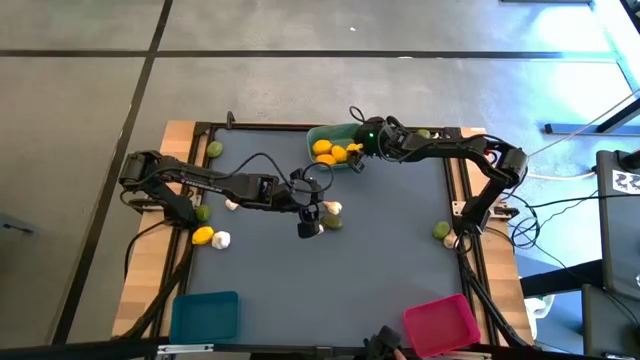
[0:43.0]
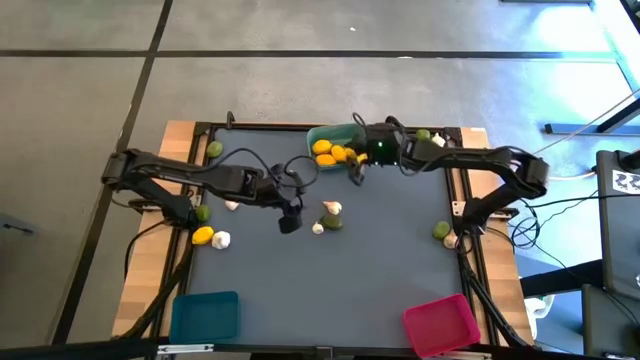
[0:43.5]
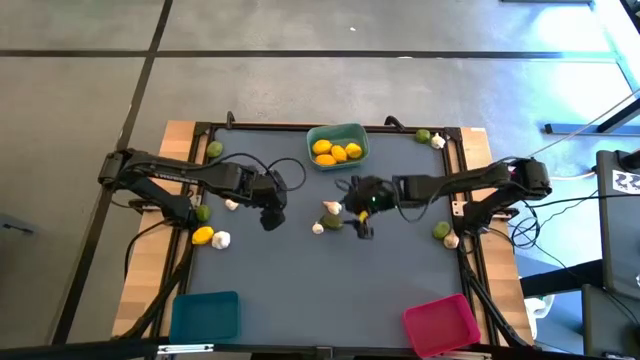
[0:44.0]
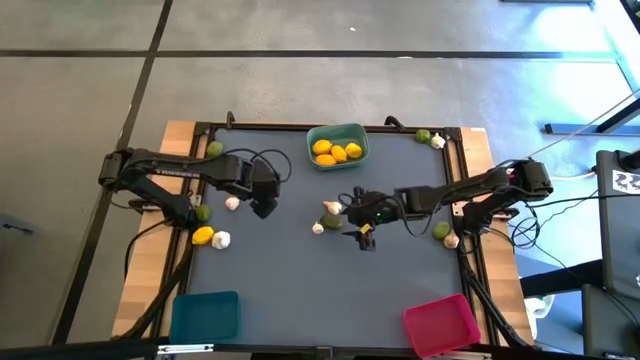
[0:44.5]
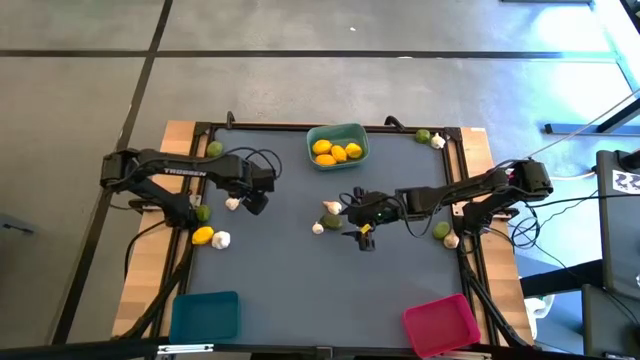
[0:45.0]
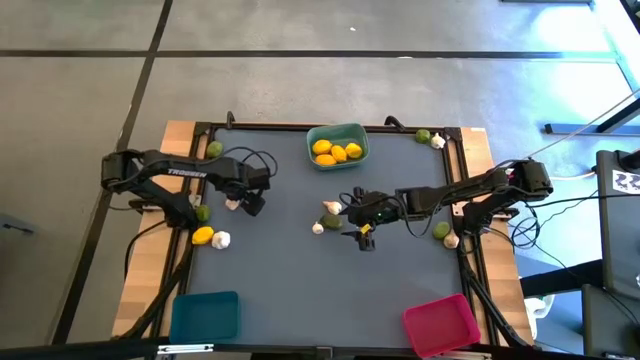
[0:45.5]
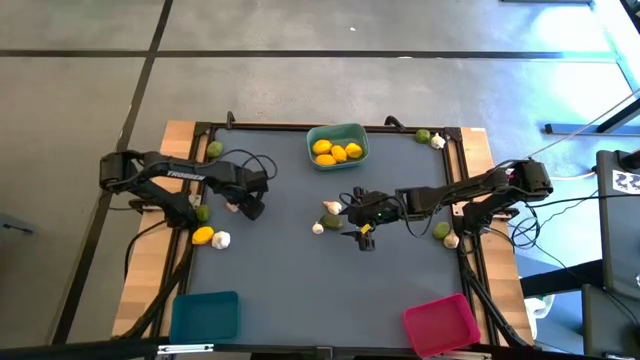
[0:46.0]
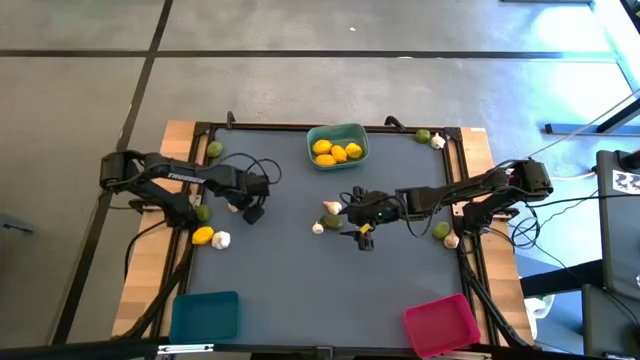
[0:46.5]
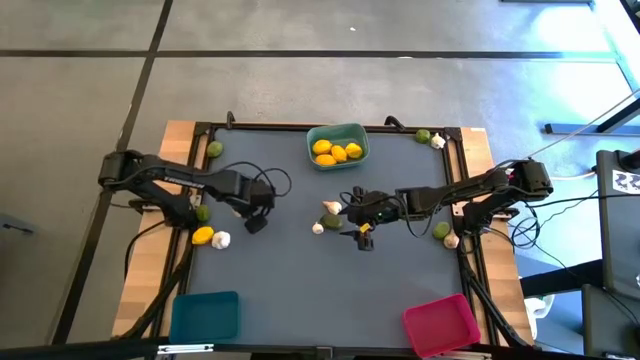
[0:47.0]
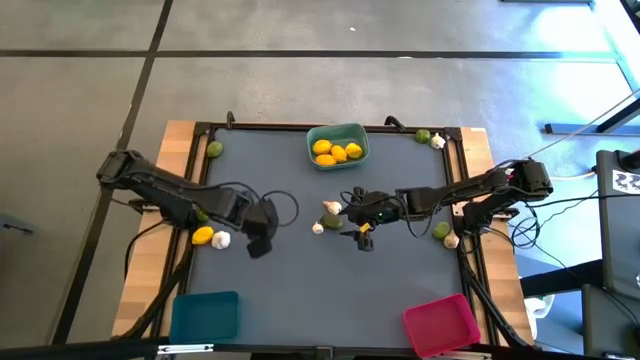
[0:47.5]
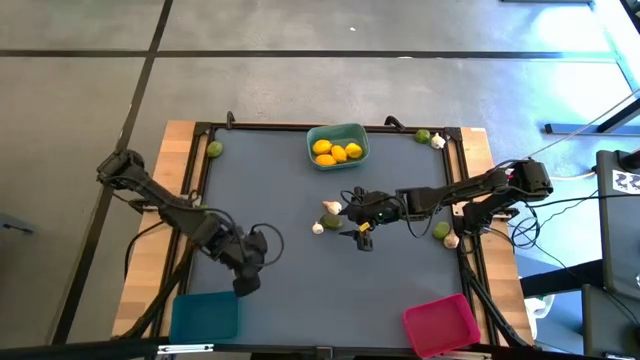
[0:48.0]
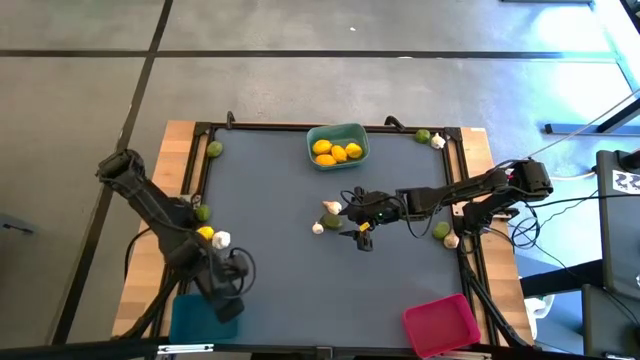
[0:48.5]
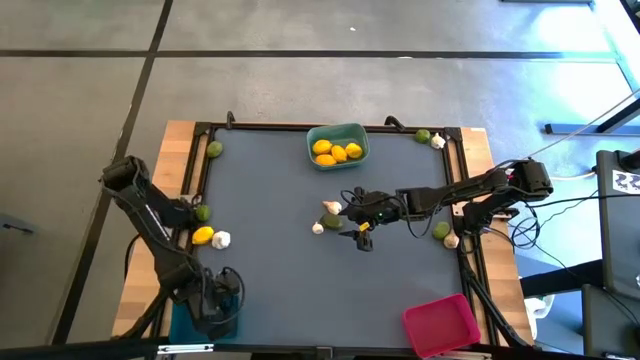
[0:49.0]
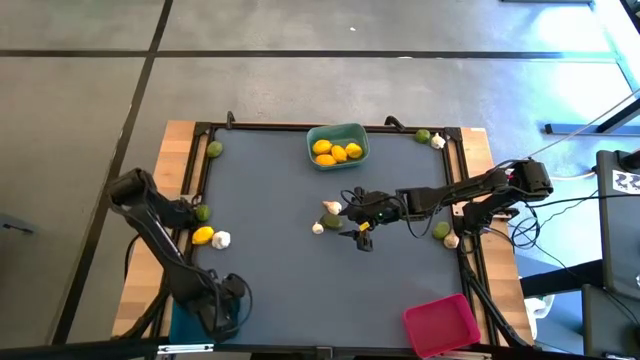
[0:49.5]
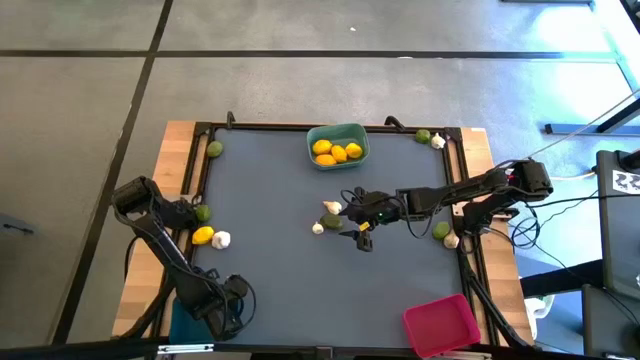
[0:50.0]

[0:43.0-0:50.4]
Task: Sort produce into baskets
Put the white garlic into the blue bin

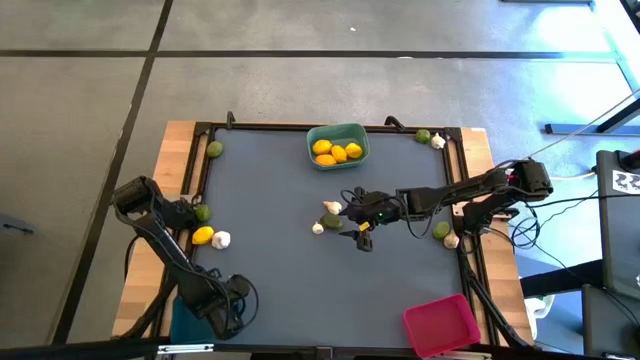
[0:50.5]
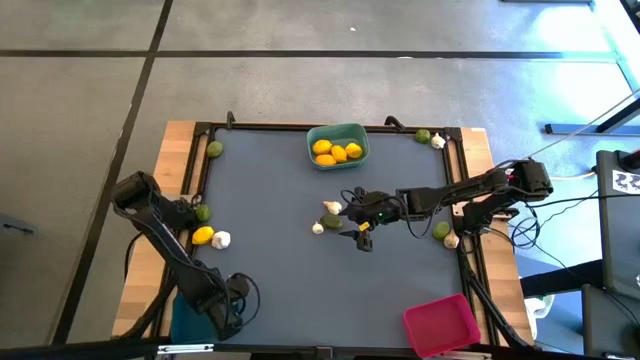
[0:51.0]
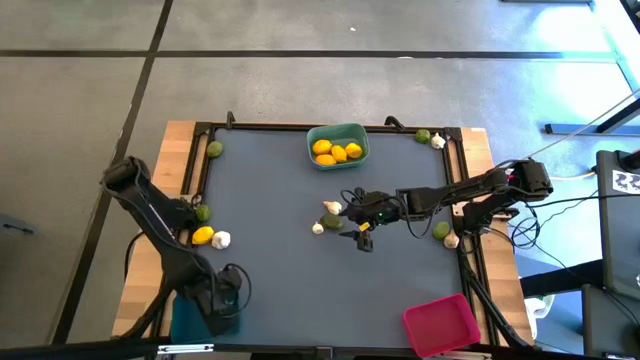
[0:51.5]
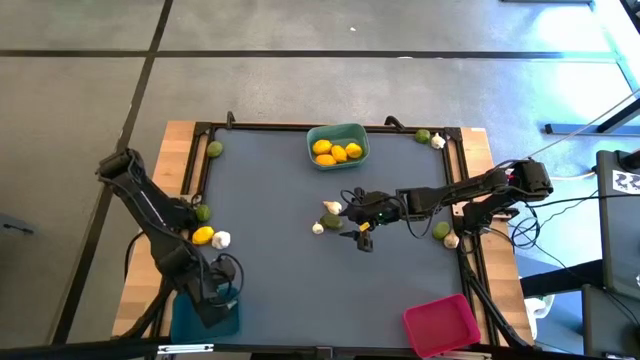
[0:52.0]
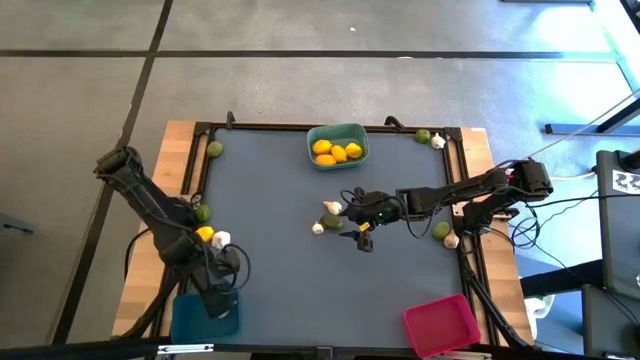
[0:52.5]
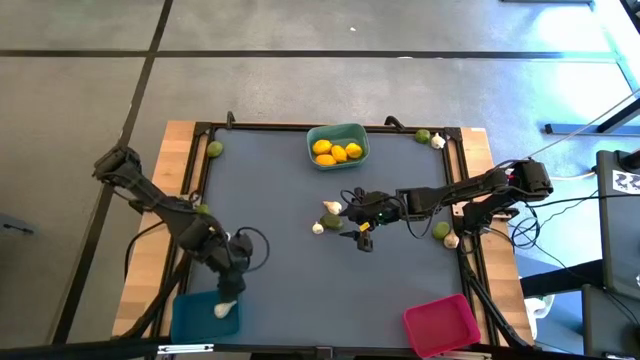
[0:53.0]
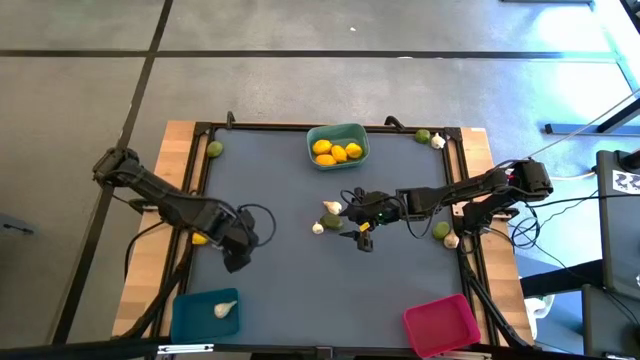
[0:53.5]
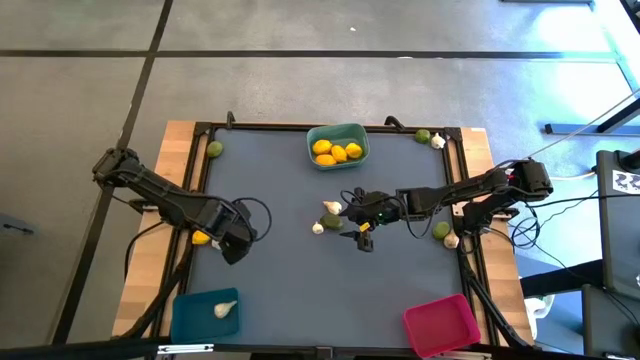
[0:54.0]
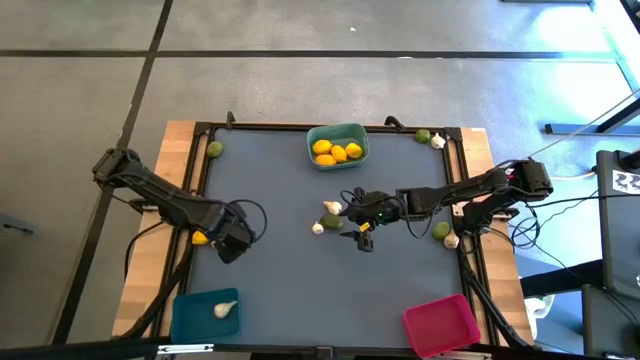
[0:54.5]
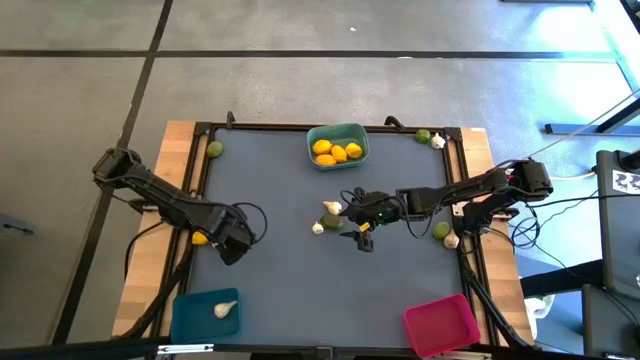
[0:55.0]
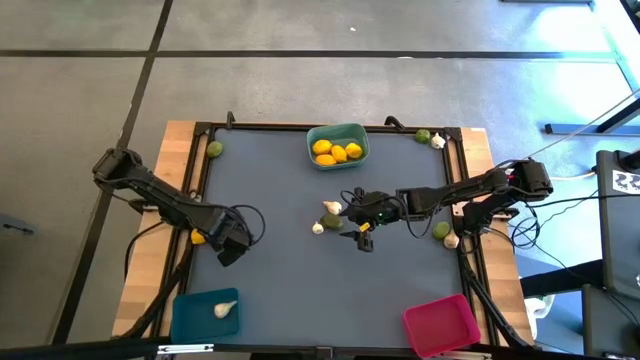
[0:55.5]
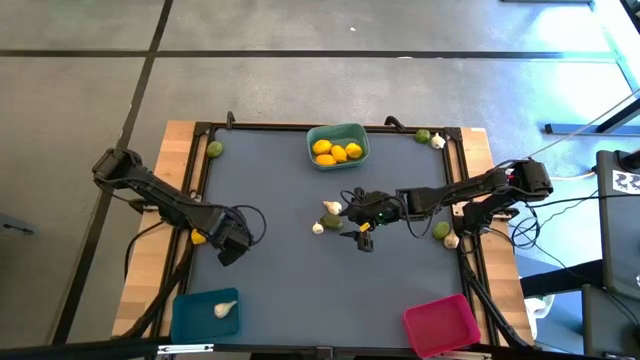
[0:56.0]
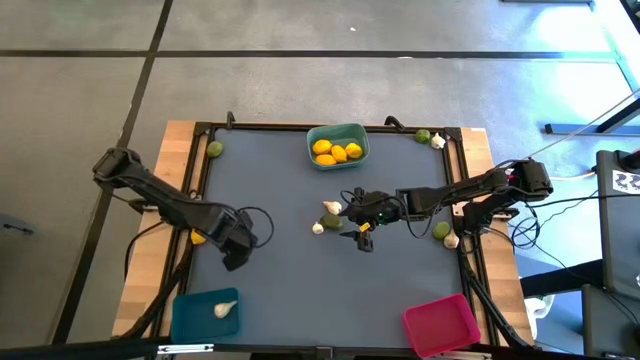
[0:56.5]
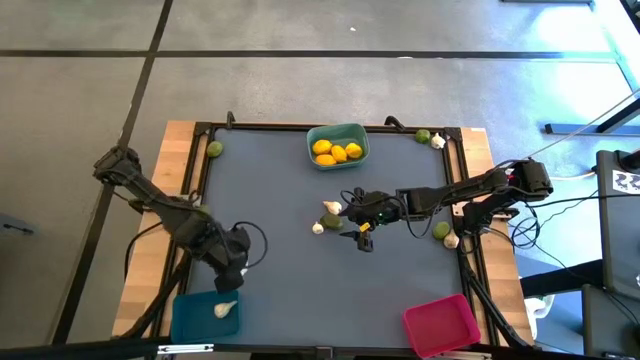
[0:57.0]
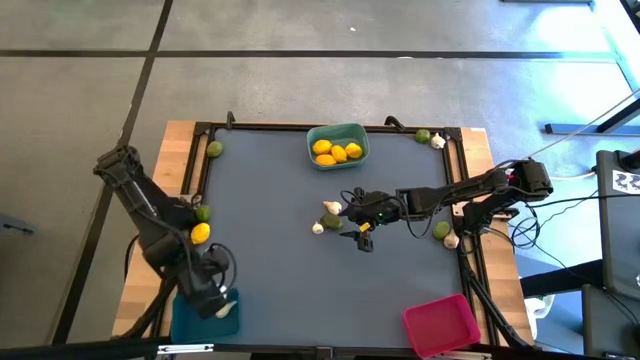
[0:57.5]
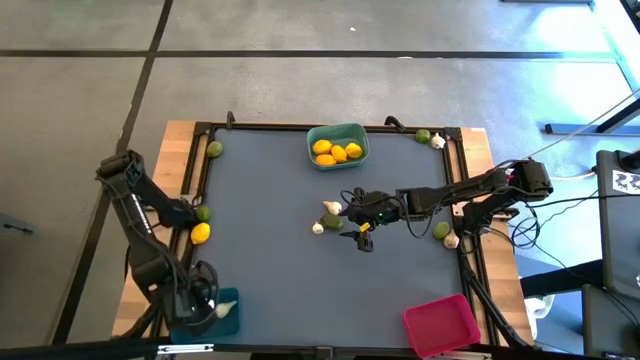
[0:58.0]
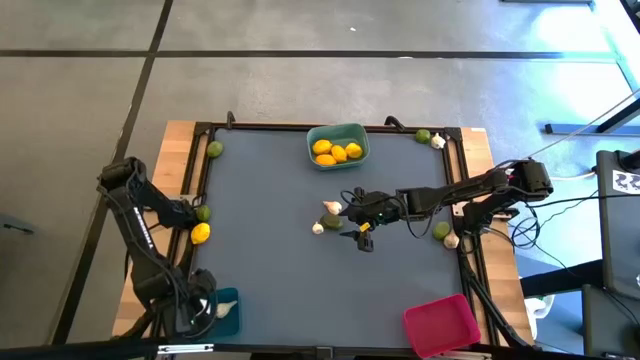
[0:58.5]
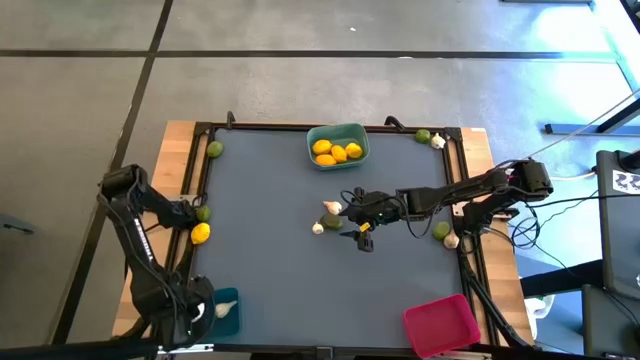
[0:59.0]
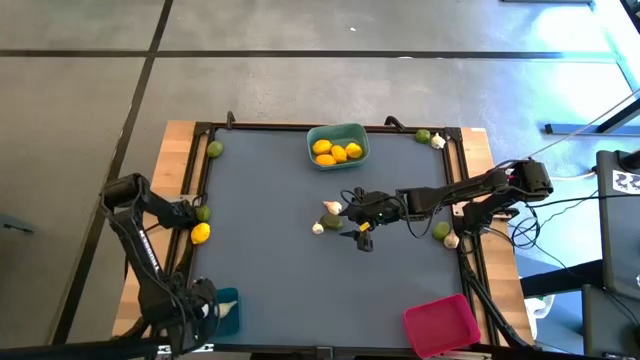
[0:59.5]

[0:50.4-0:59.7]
Put the white garlic into the blue bin

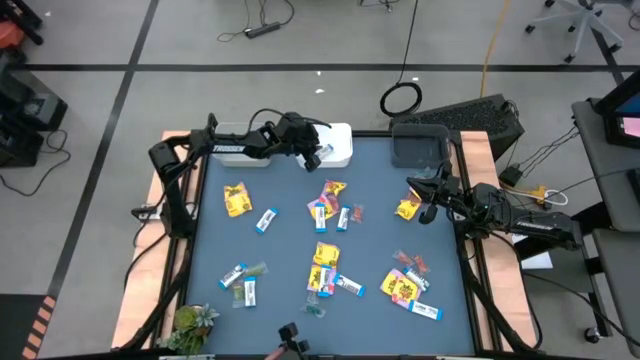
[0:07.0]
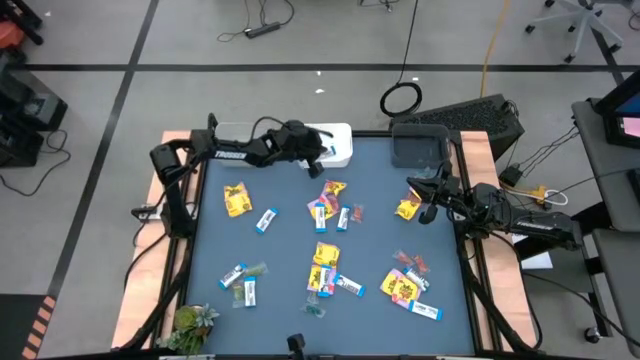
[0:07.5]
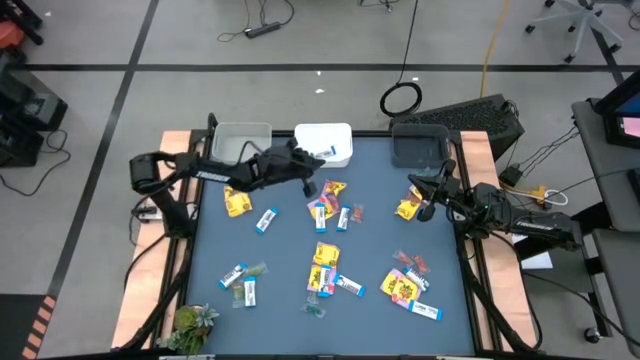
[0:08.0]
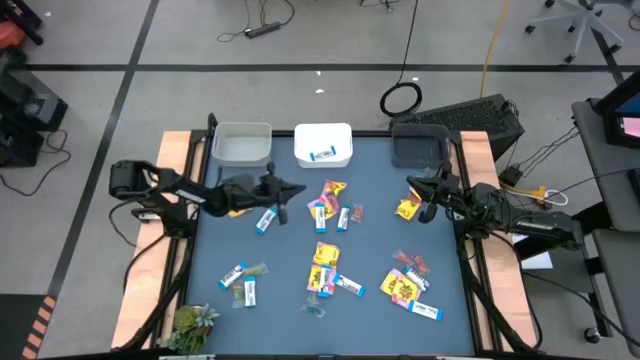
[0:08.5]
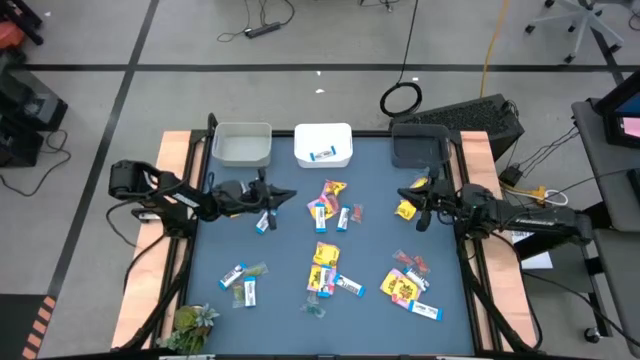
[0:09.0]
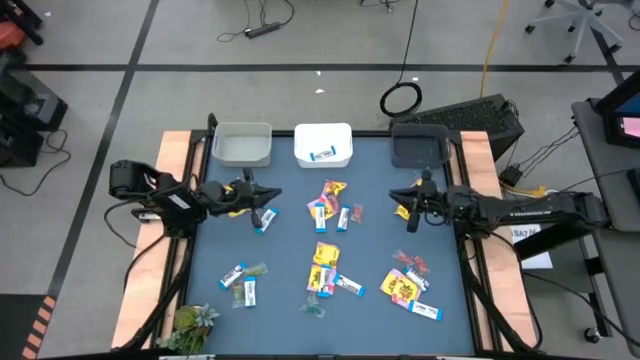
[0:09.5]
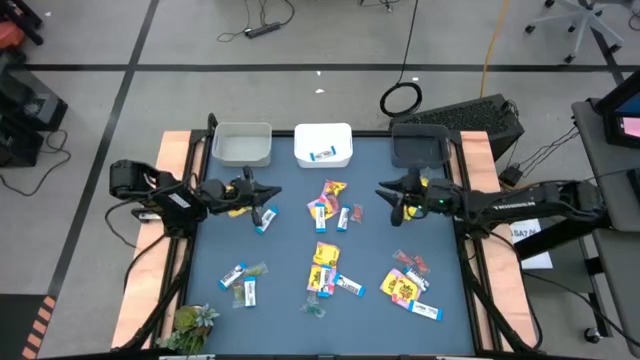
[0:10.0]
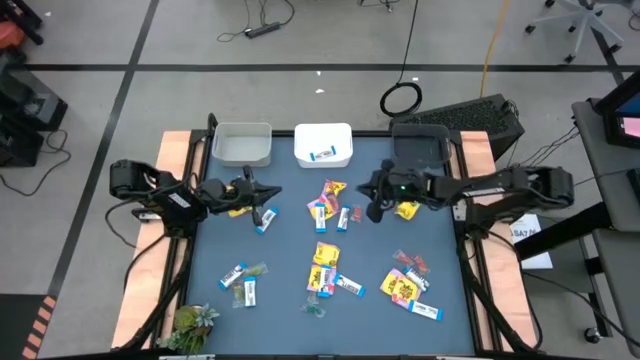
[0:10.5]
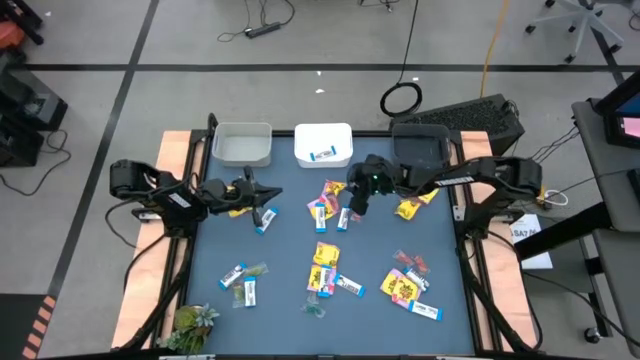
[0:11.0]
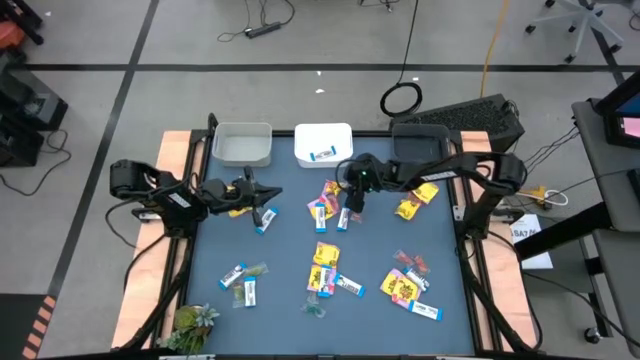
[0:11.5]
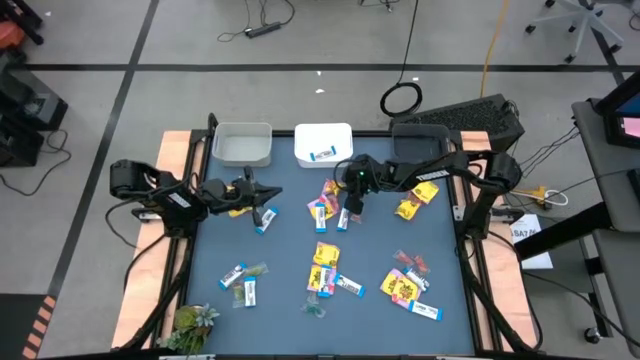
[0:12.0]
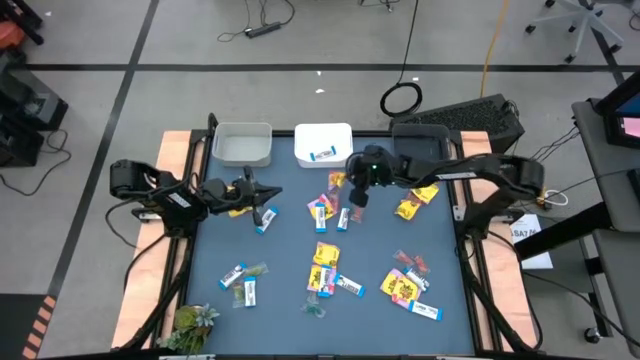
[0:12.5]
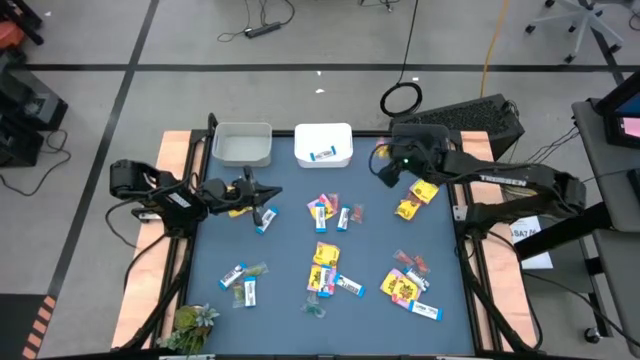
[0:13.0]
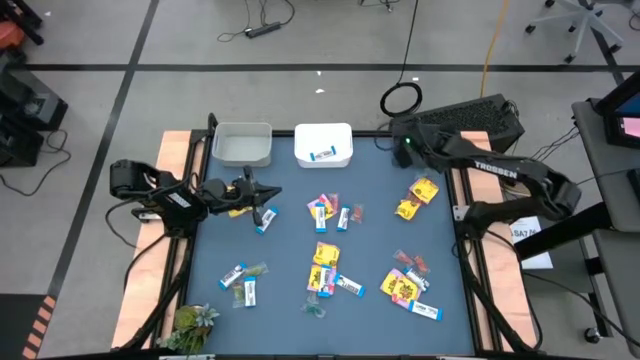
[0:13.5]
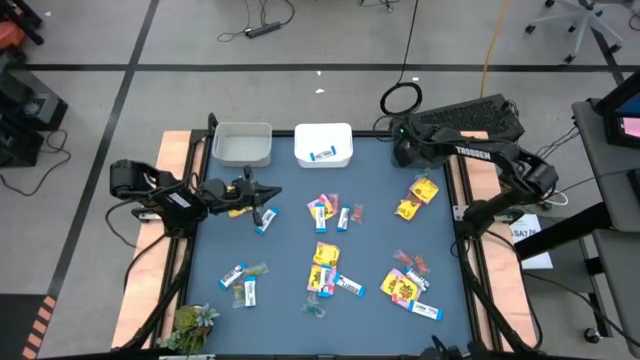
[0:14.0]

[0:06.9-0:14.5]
Task: Sort candy
Put the yellow candy into the black bin
